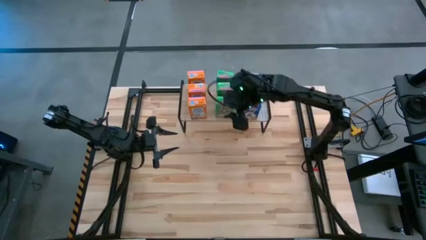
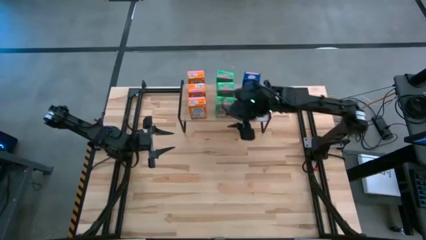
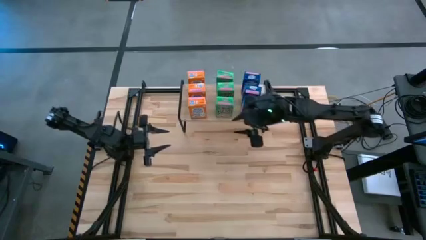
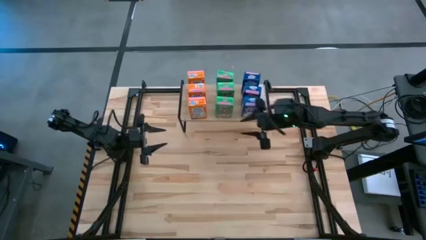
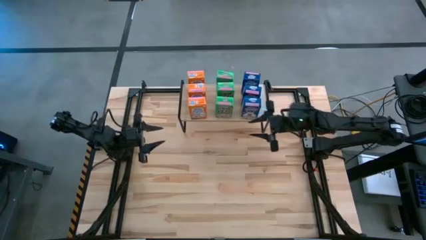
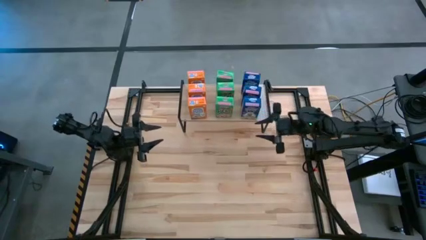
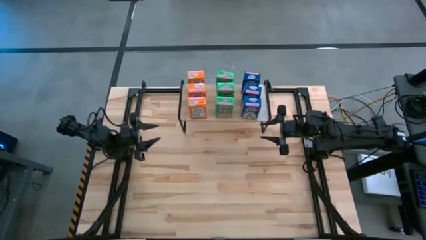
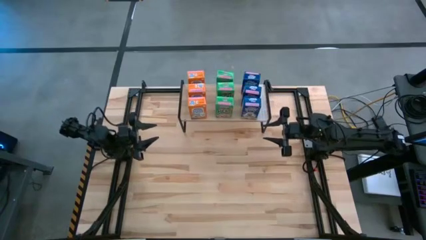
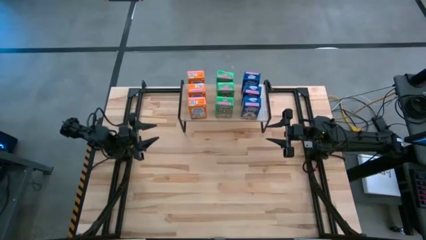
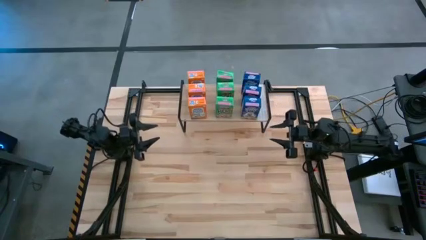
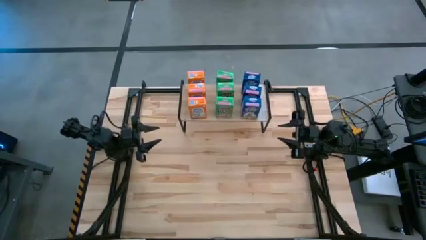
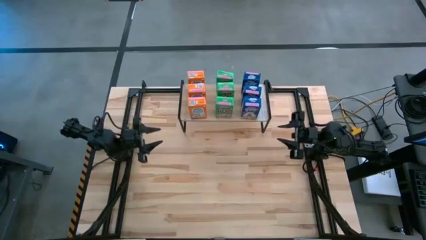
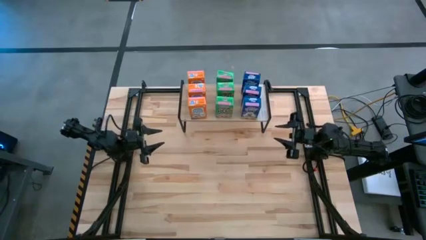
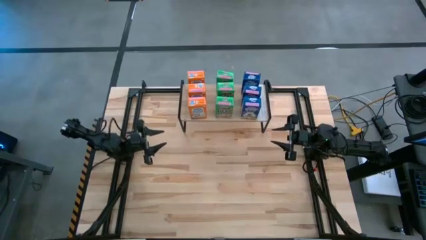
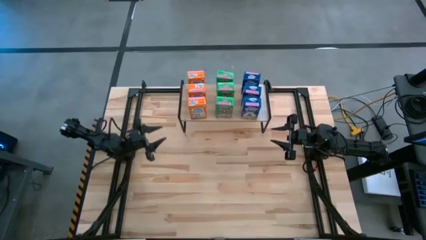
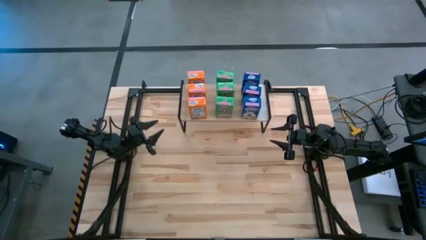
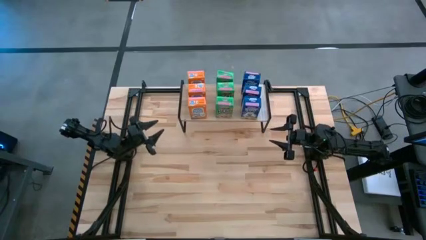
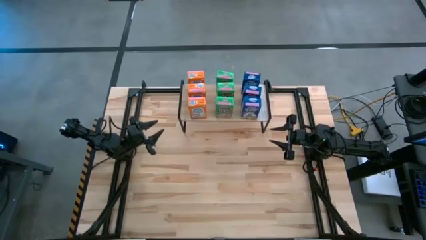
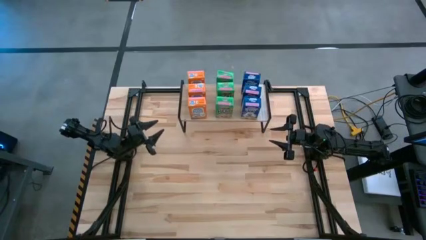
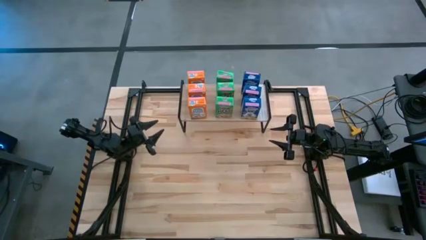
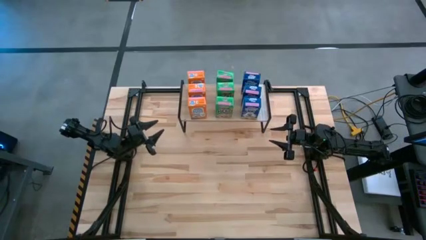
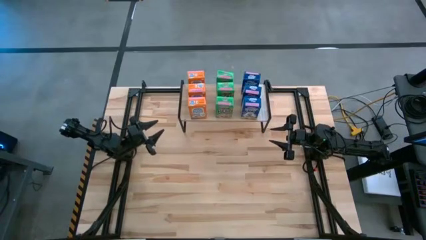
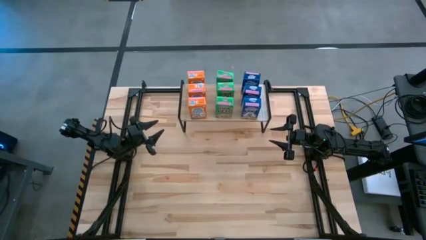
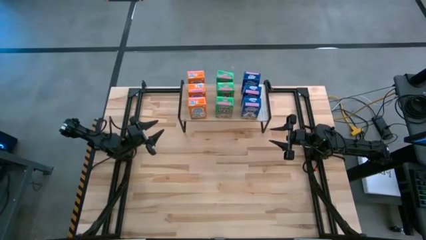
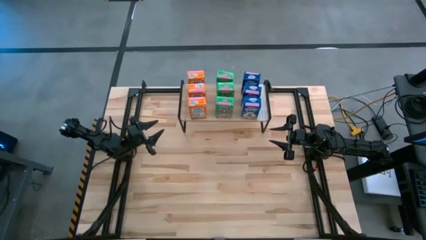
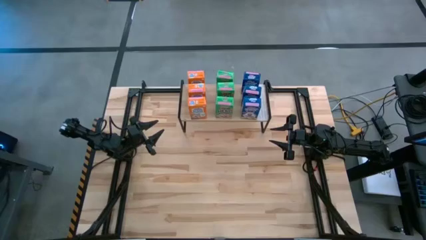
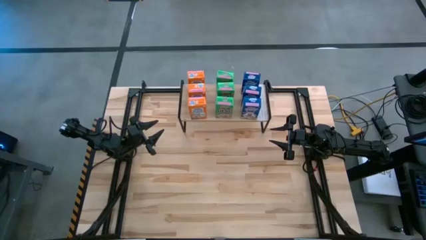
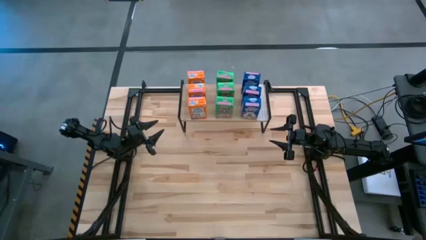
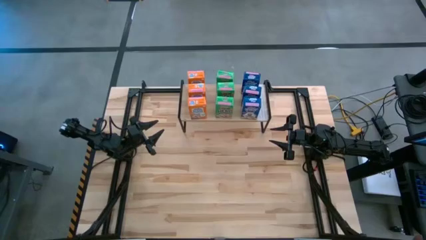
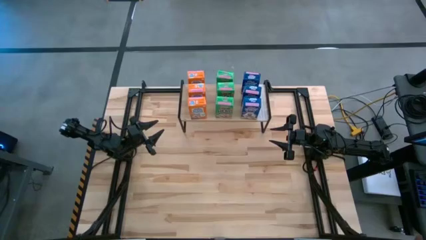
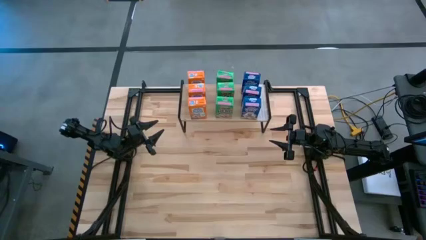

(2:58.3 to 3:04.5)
Task: Stack cereal on shelf
Return to Home Position

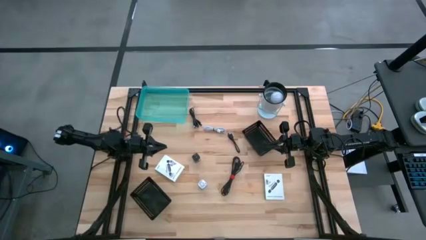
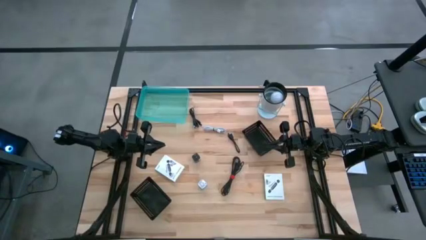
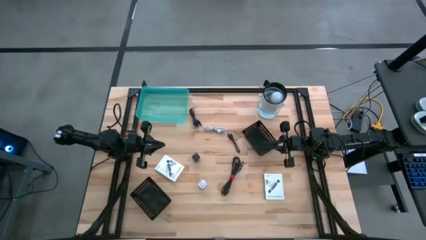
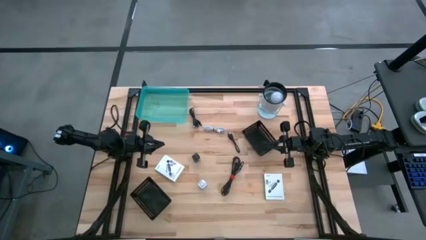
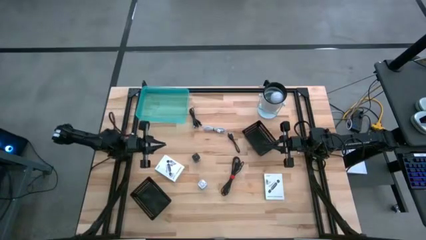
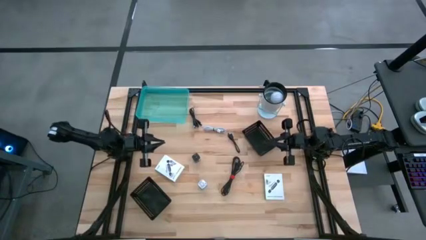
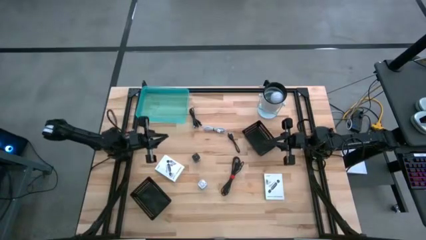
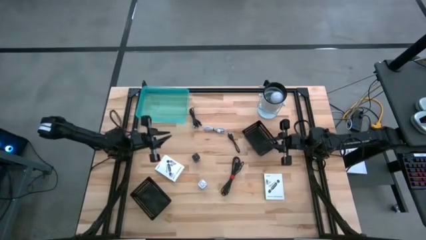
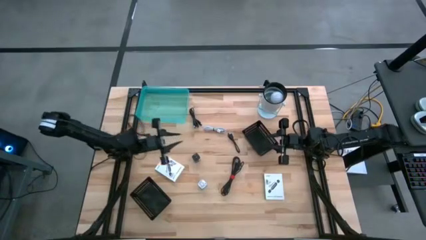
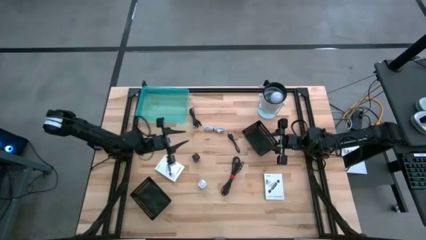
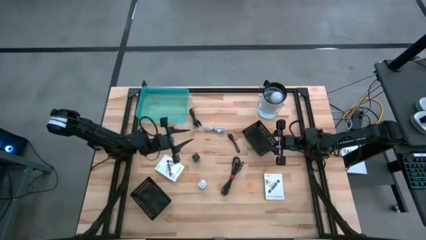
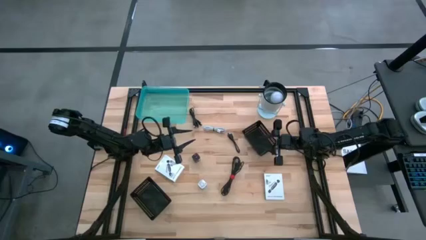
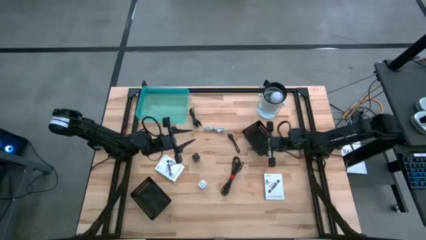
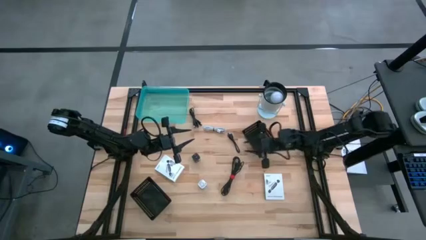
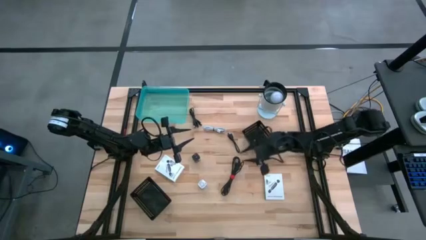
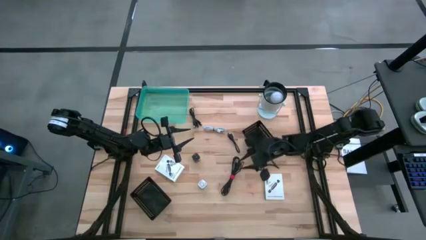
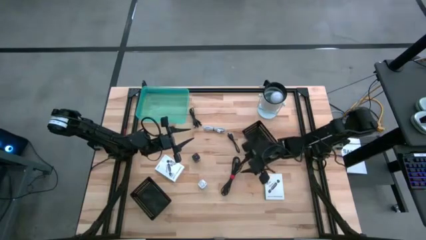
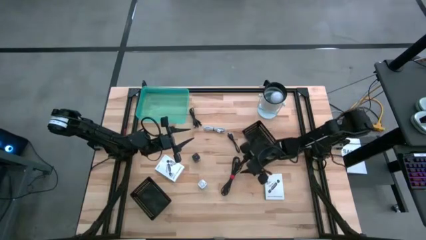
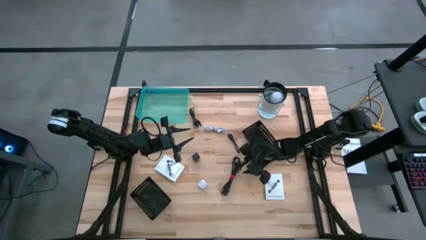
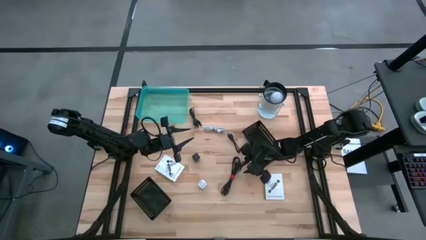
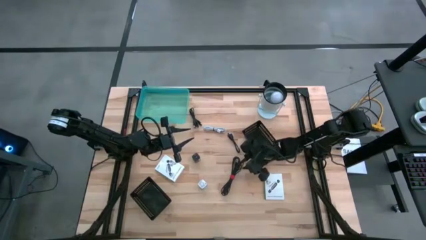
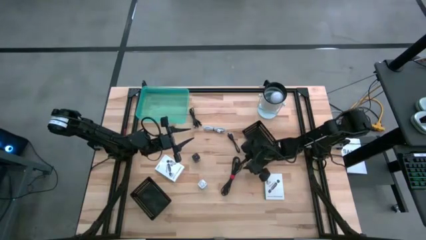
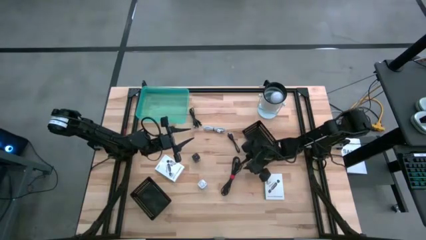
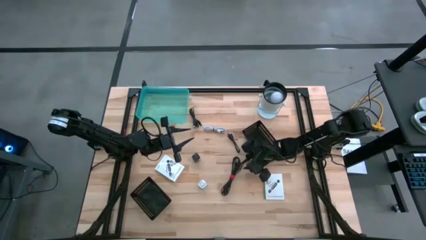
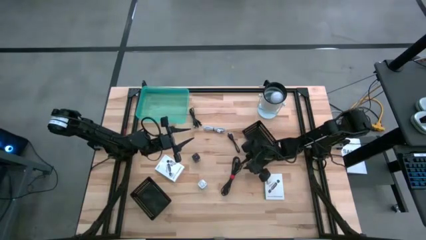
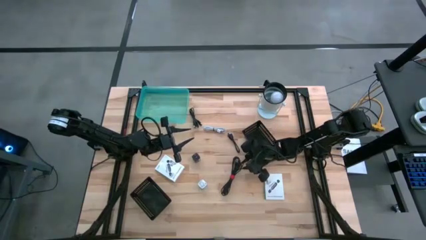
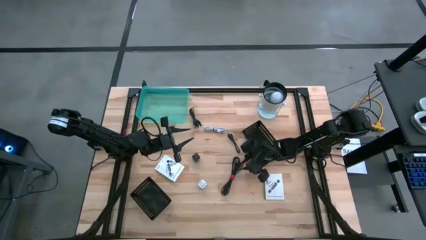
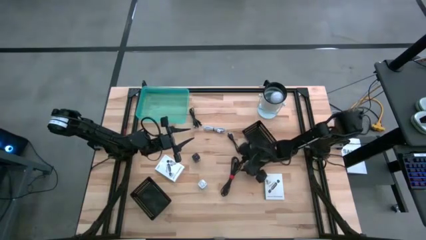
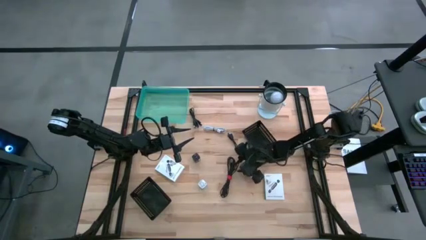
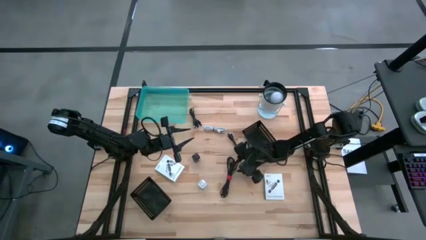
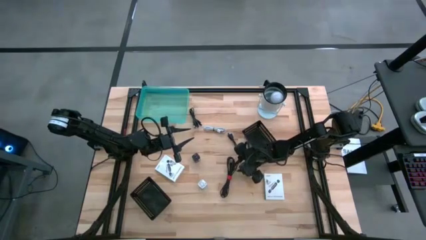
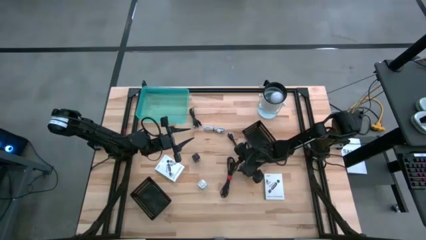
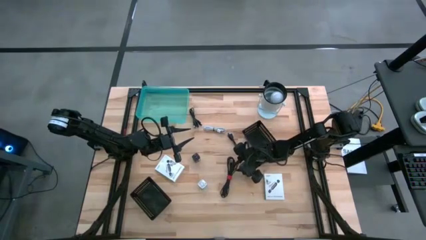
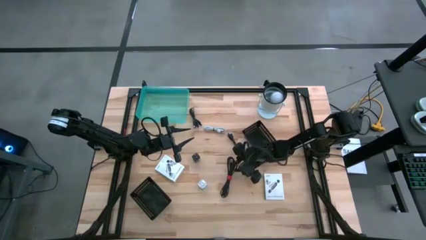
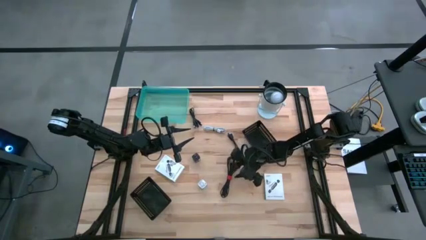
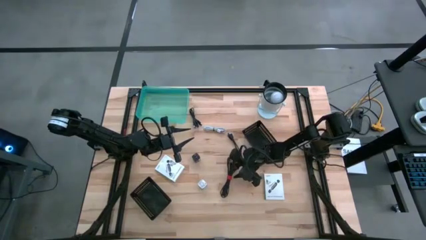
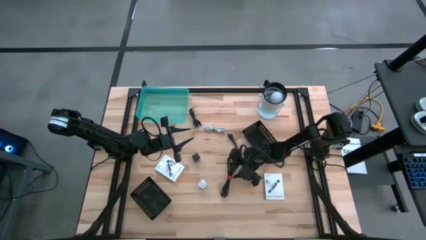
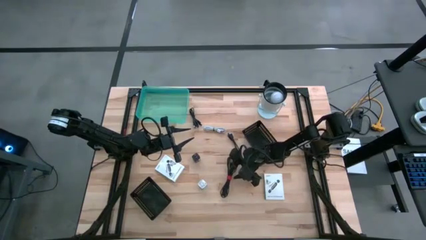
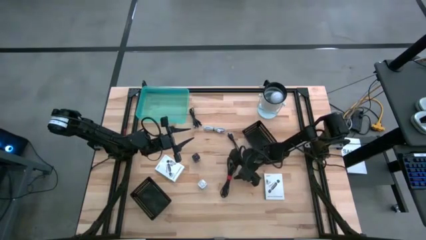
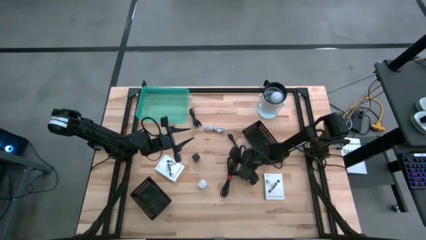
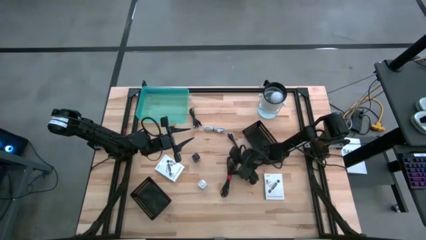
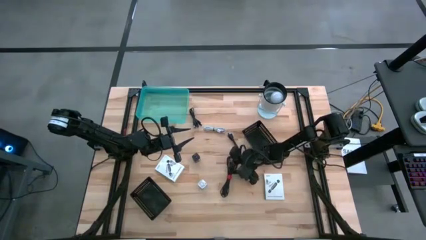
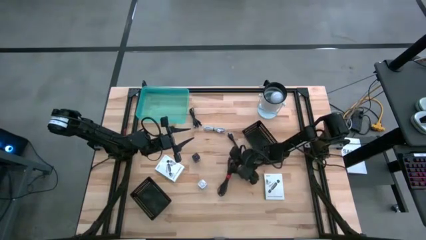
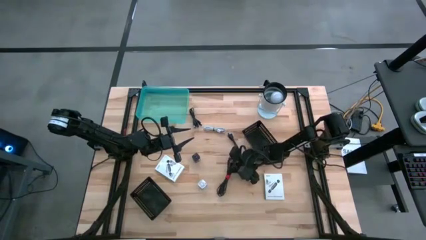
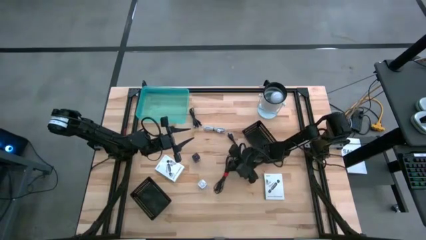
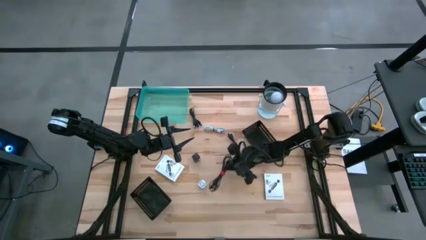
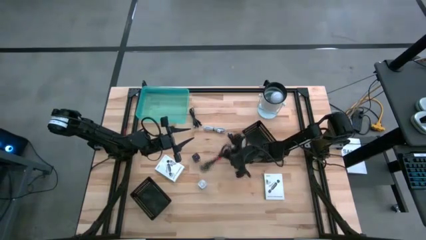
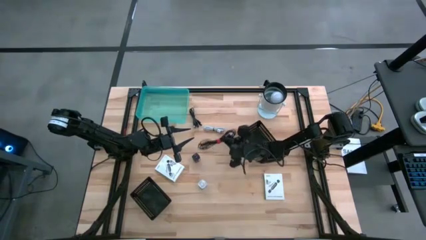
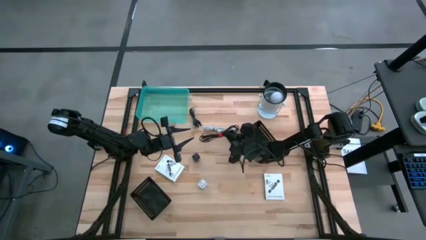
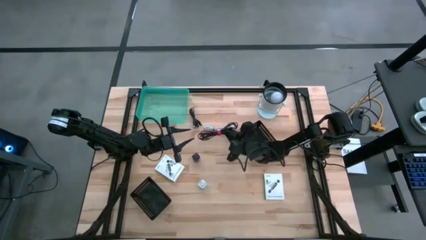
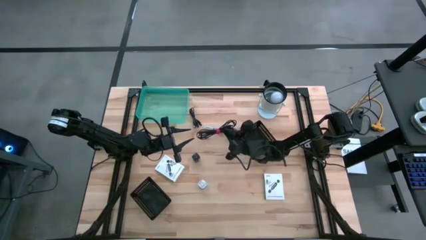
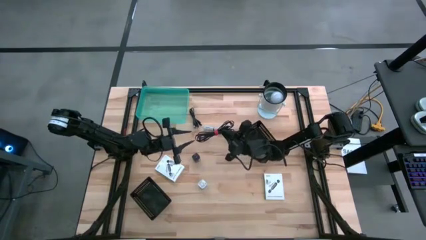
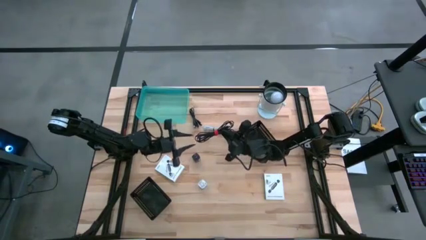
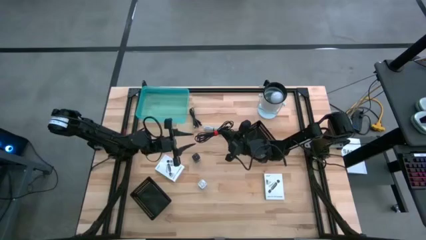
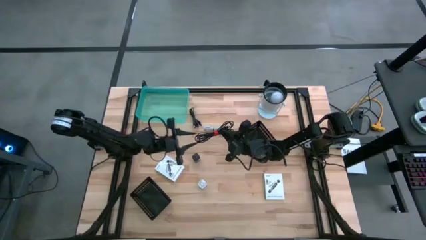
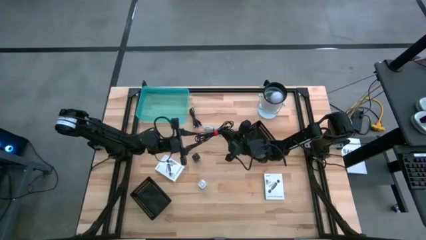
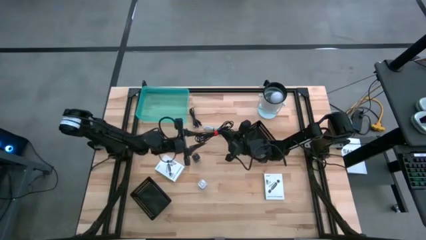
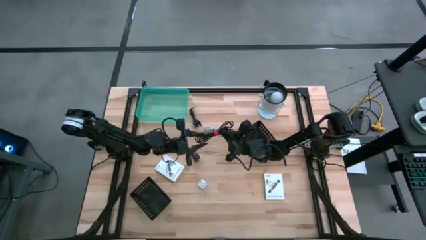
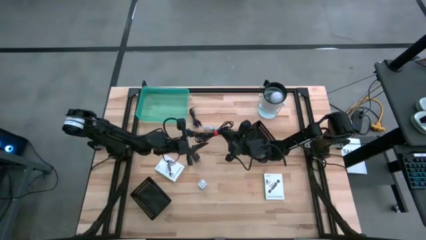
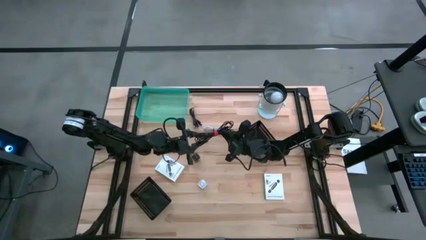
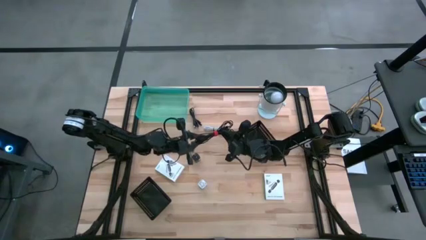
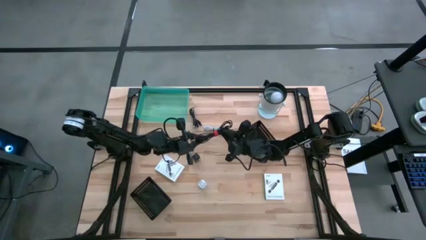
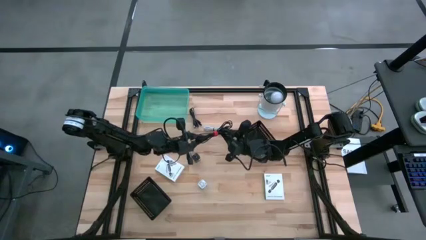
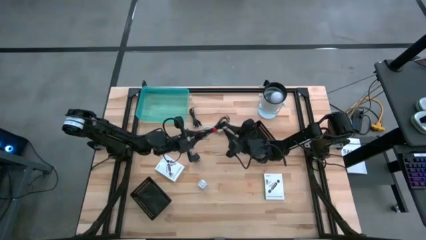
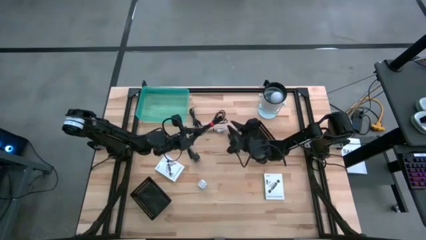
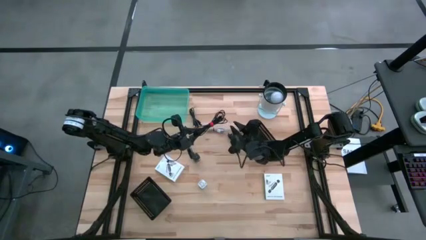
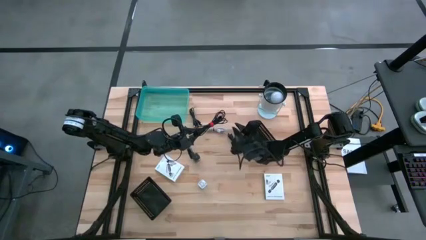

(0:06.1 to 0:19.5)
Task: Pick and place items into bin
Put the bottom black charger cable into the green bin
